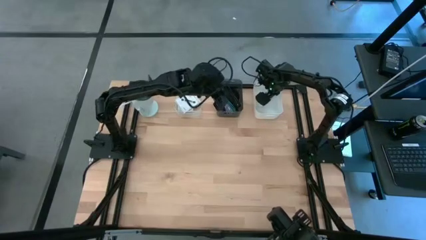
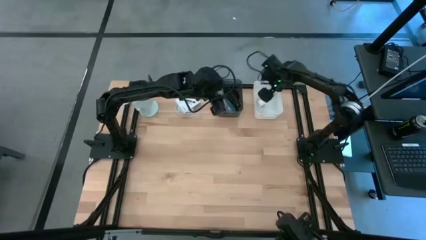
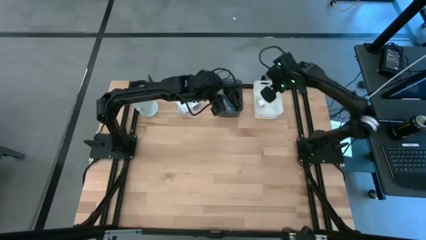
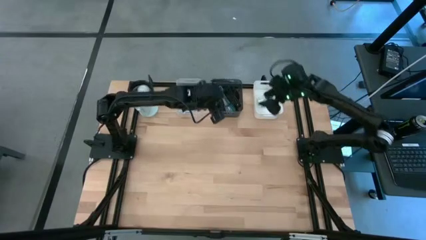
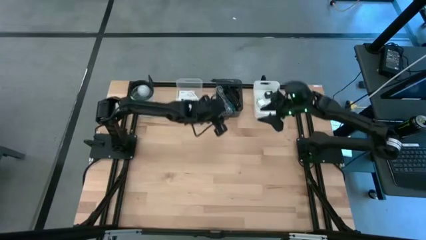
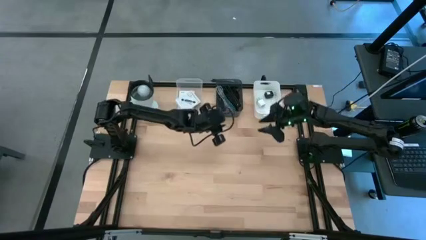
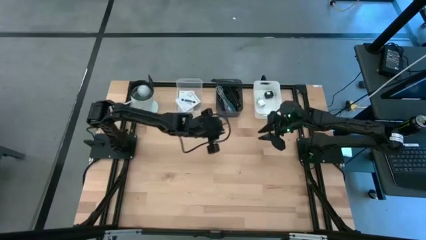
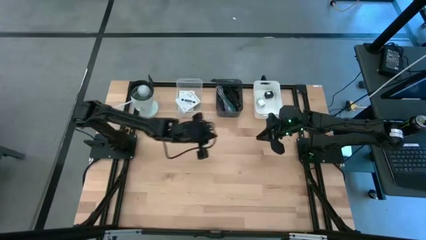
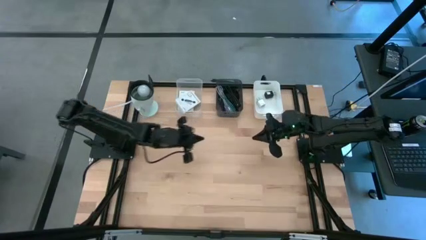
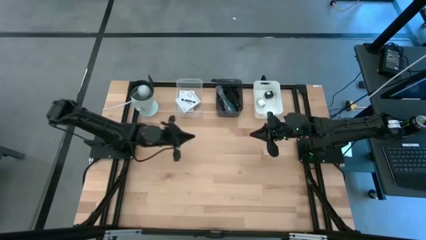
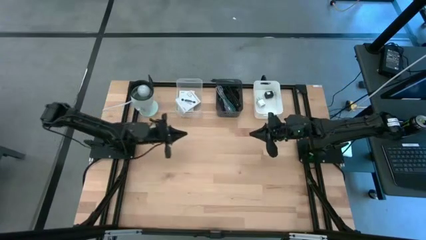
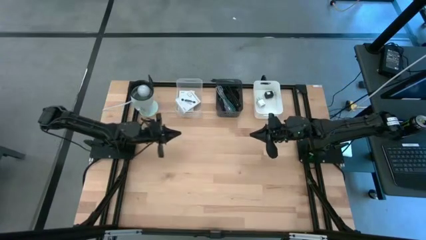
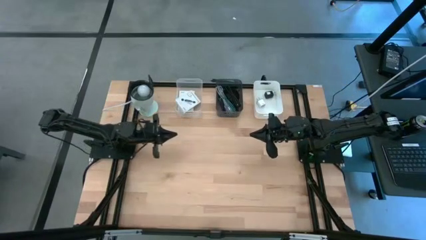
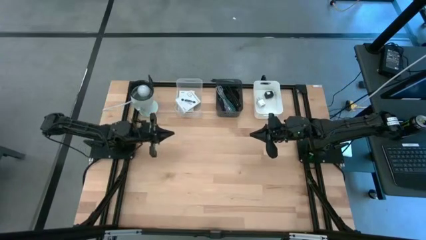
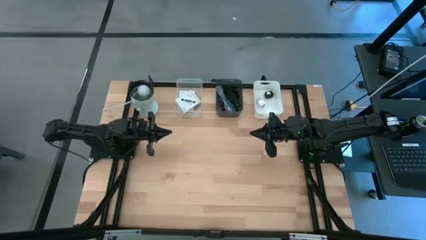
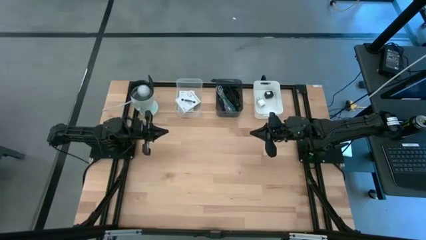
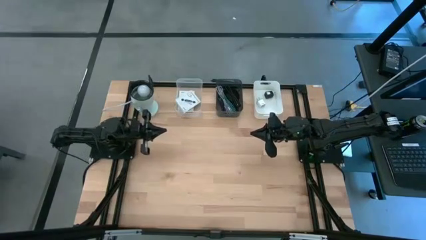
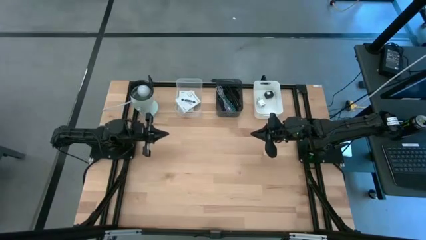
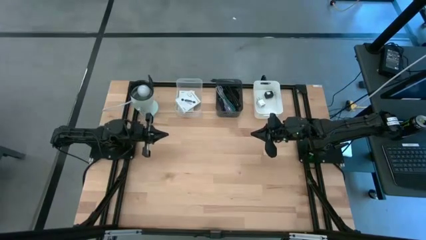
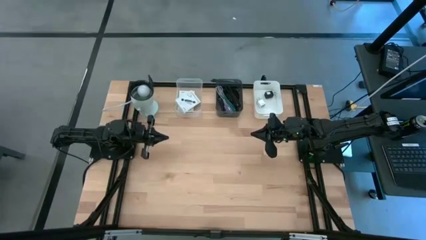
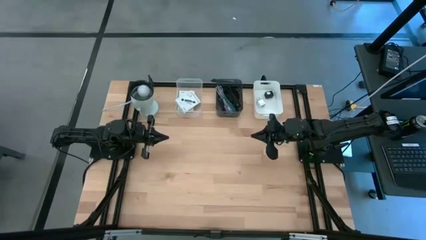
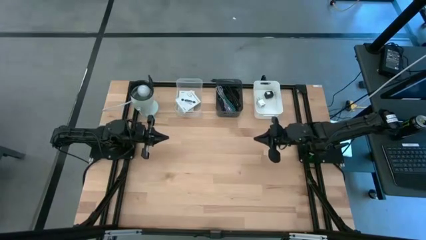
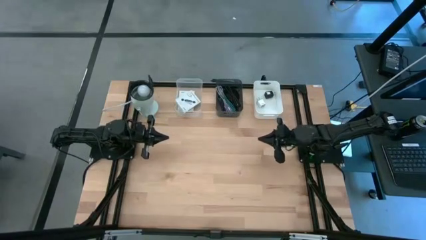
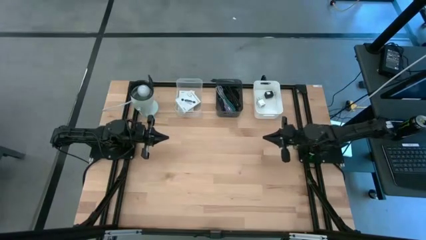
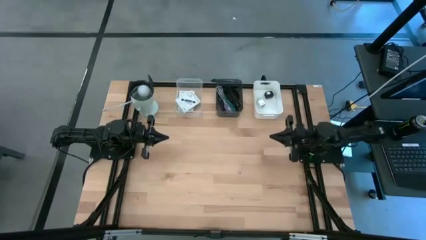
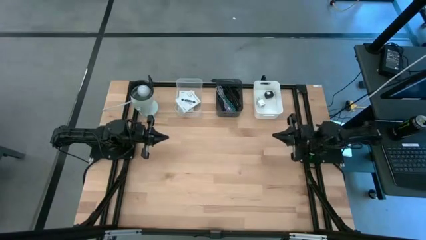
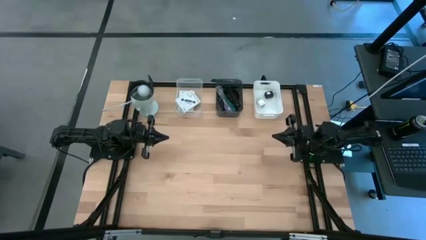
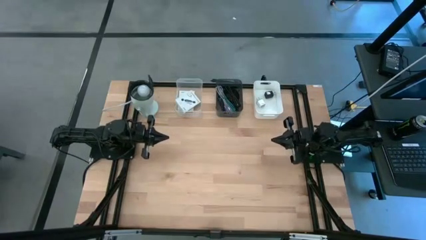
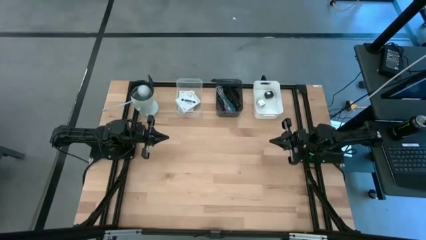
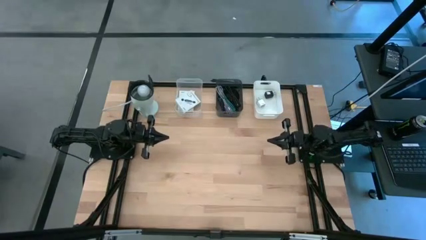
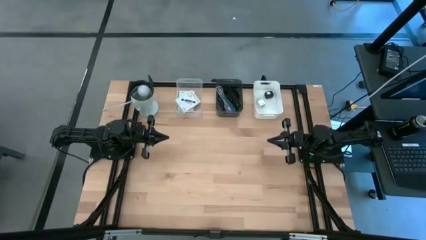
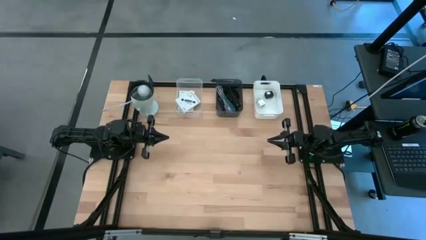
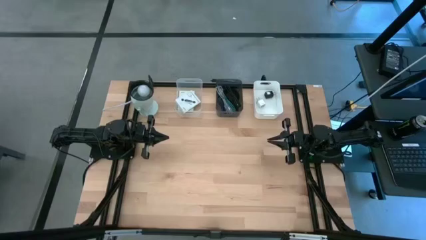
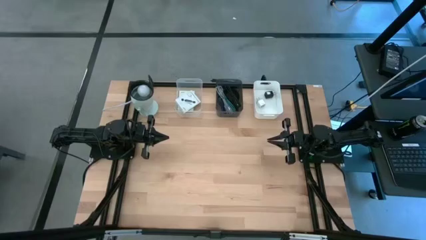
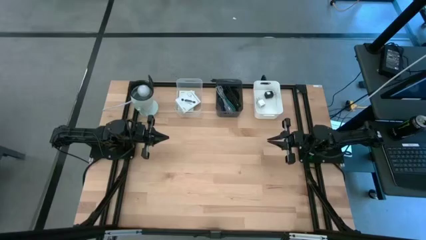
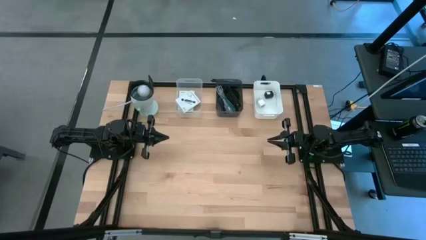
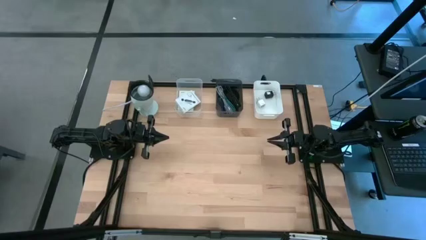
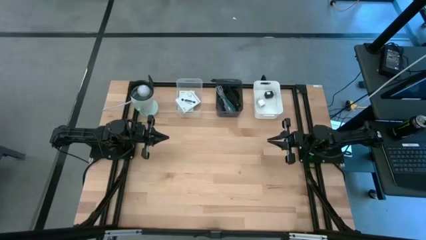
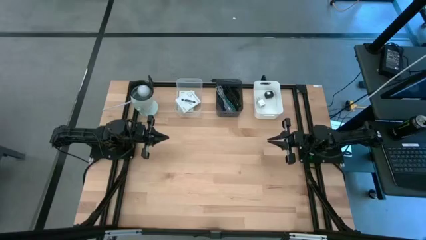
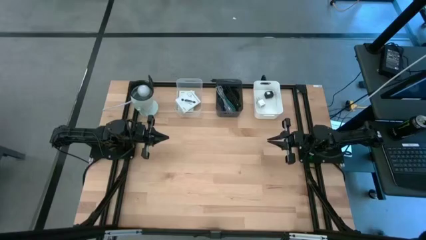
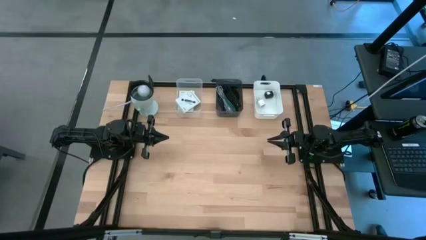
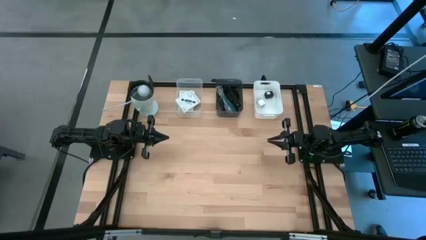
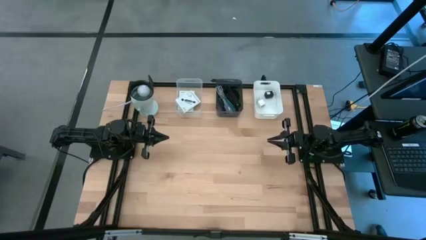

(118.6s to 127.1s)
Task: Pick and place items into bin
Return to Home Position

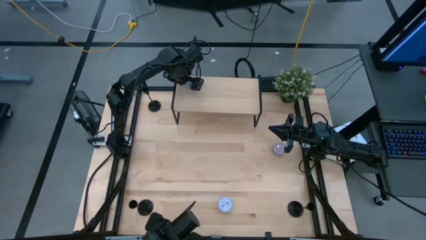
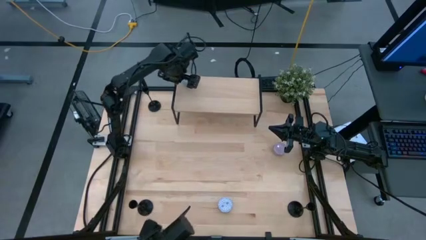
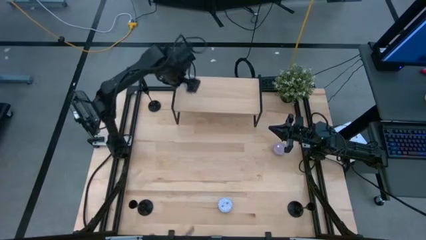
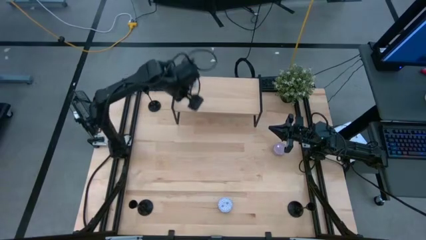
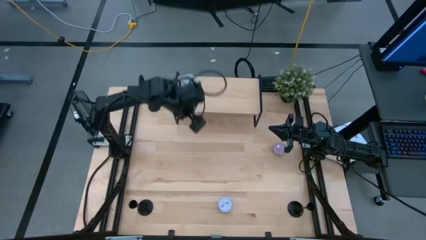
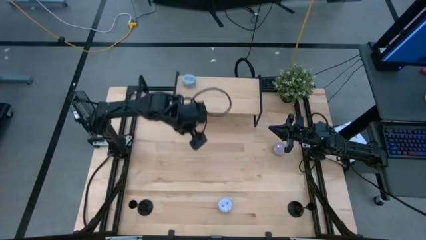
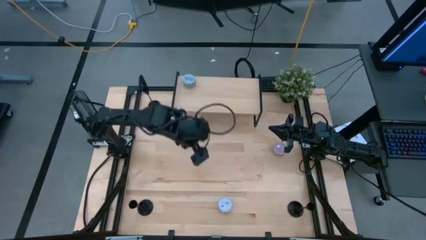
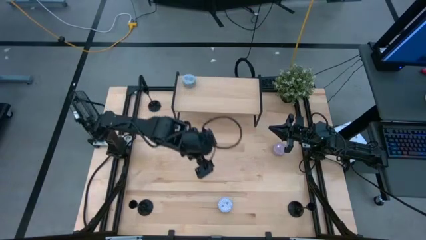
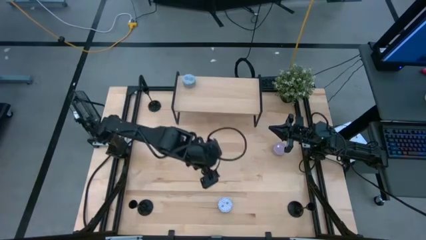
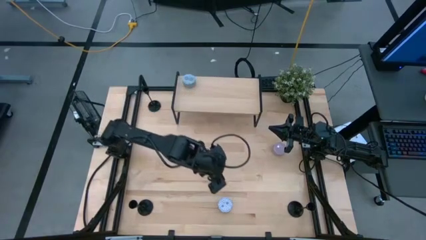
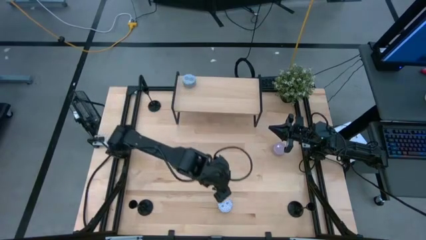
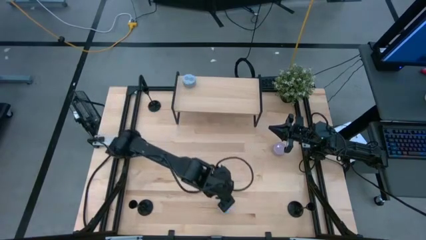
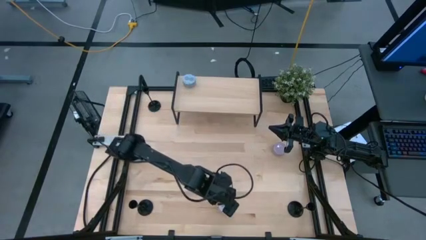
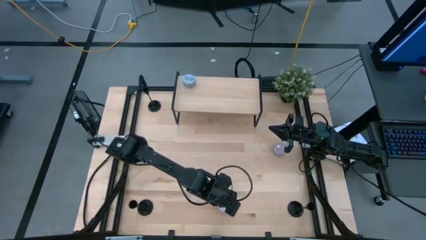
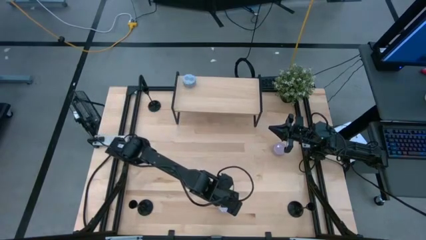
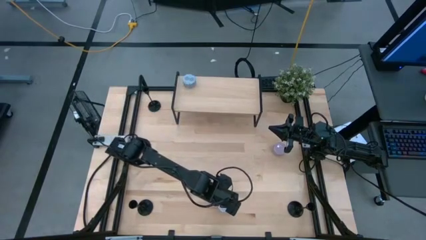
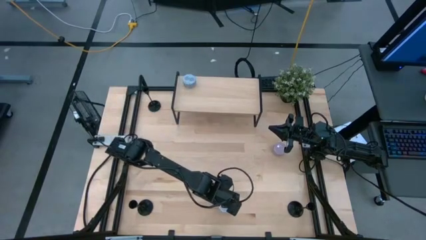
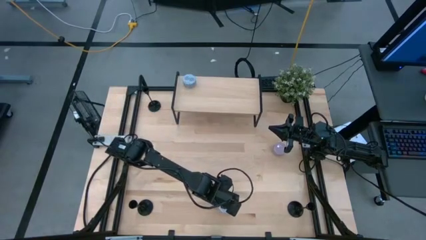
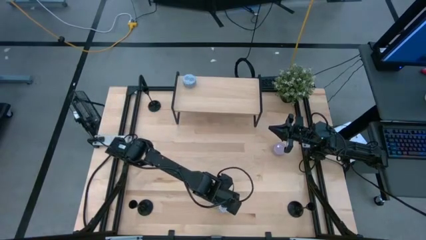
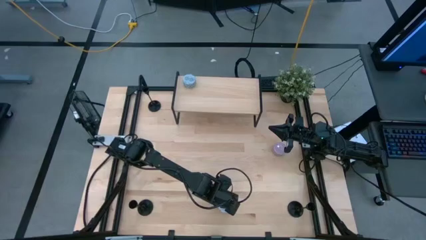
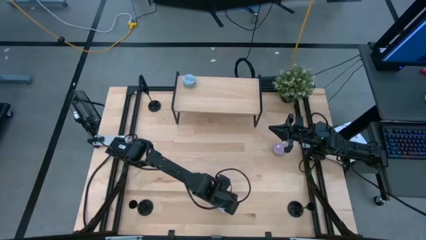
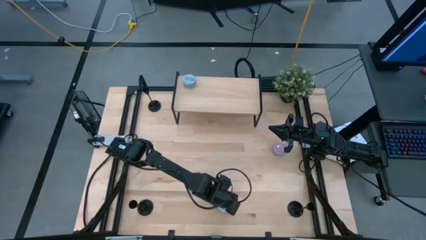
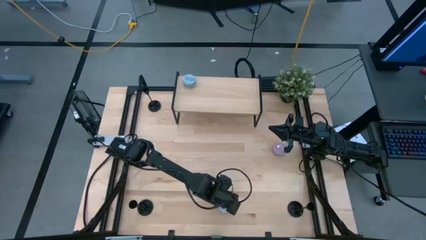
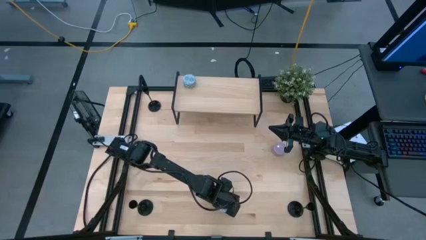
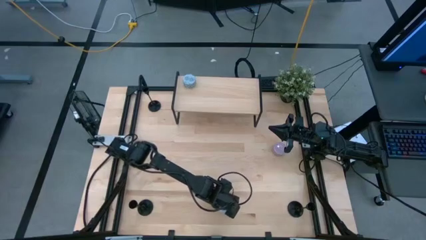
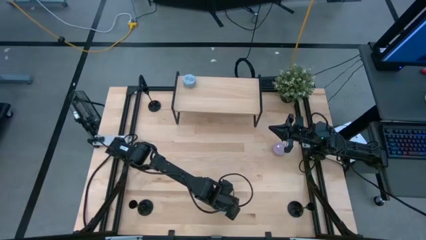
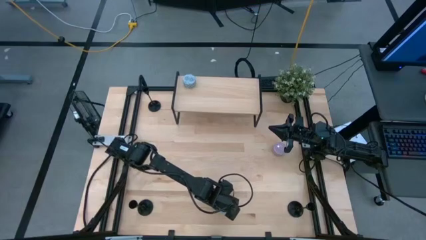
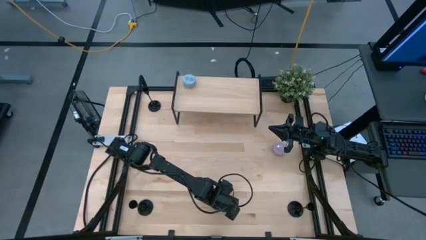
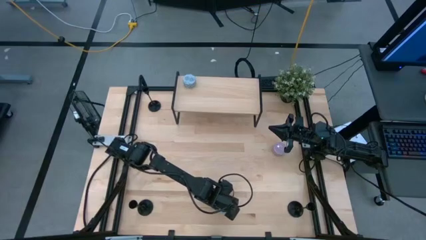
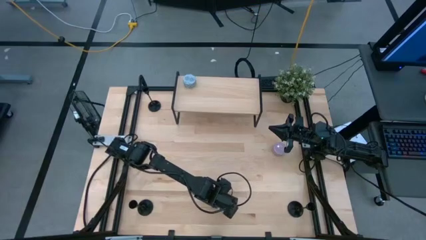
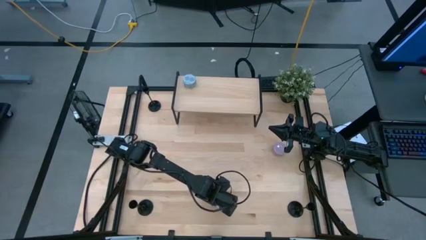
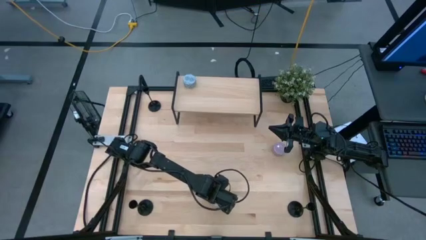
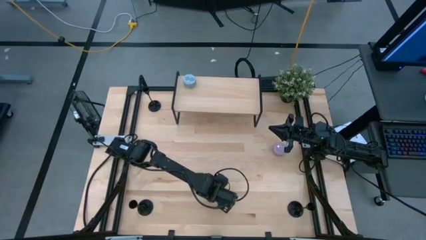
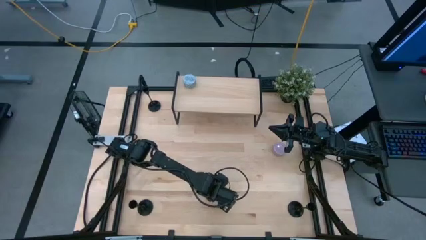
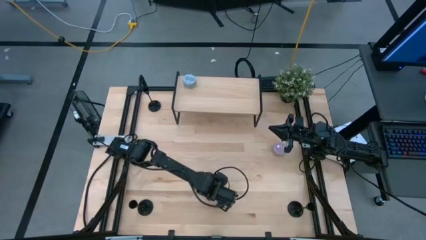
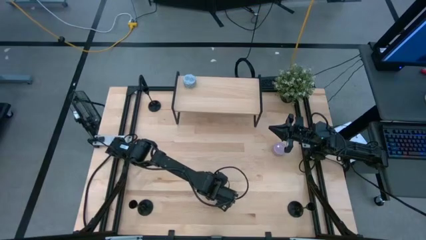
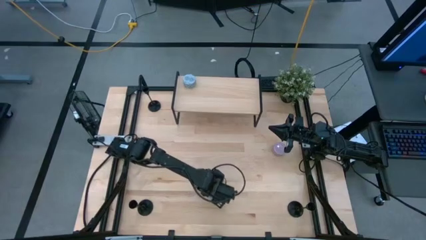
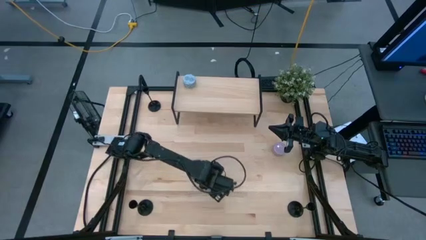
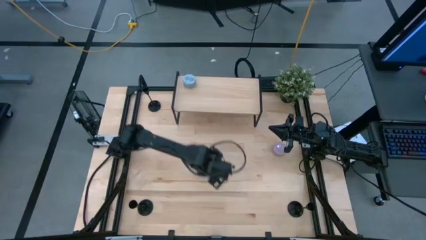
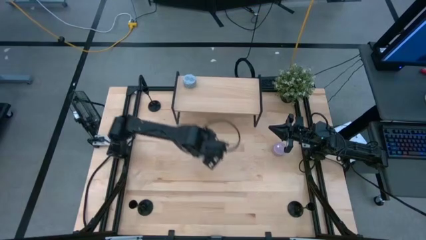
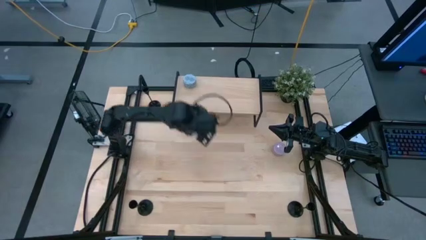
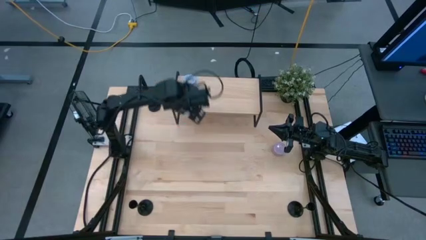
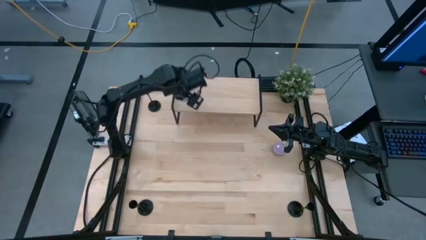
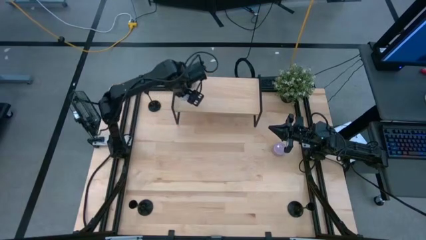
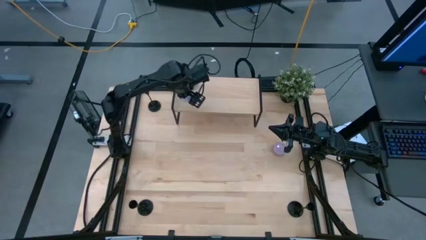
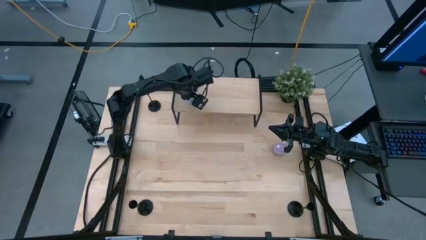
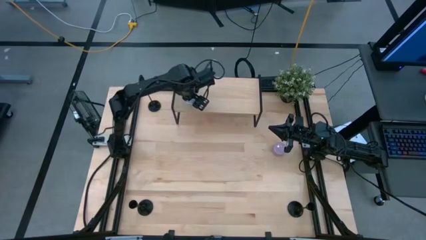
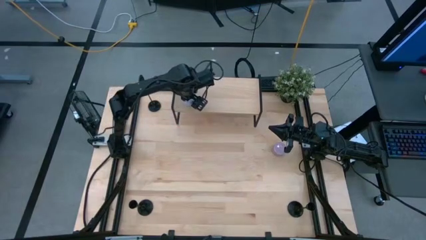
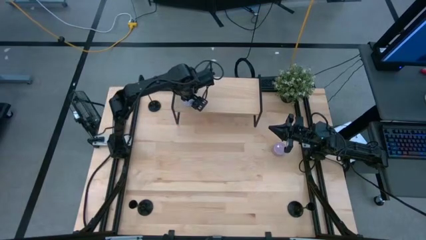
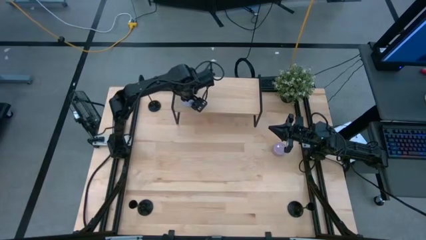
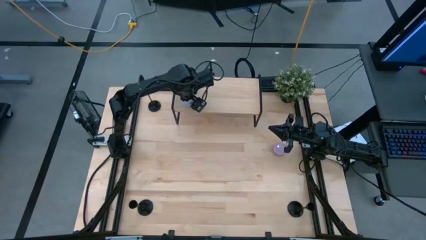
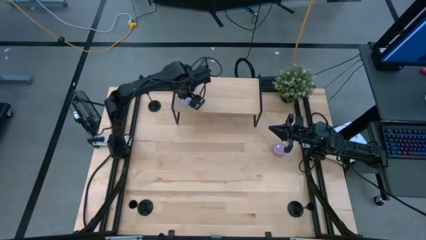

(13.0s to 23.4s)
Task: Pick & Place candle stick holders
Put the bottom white scented candle on the shelf
